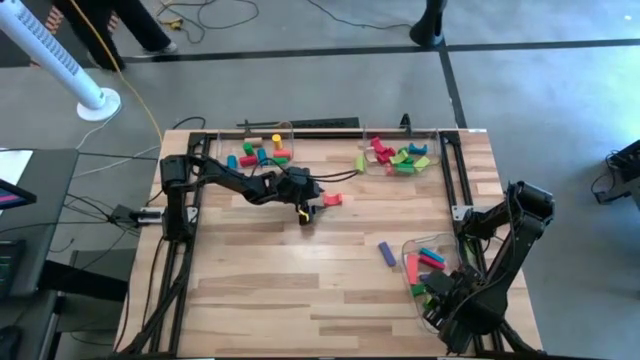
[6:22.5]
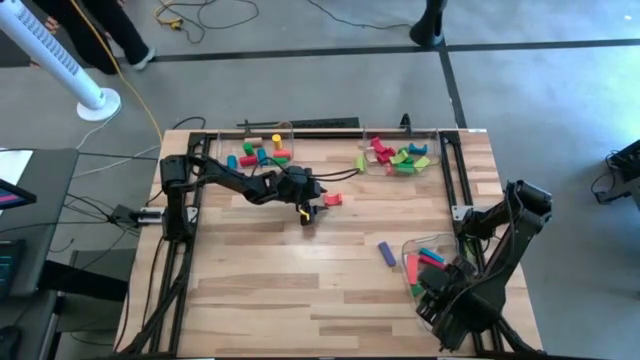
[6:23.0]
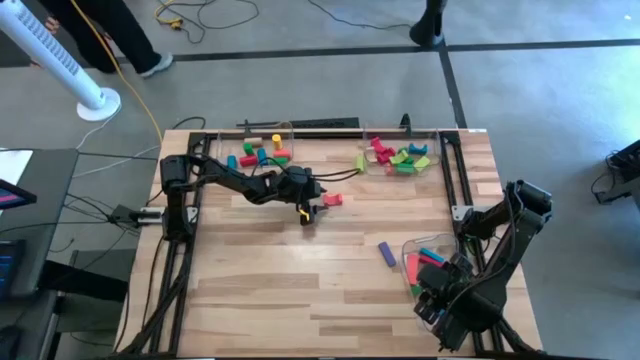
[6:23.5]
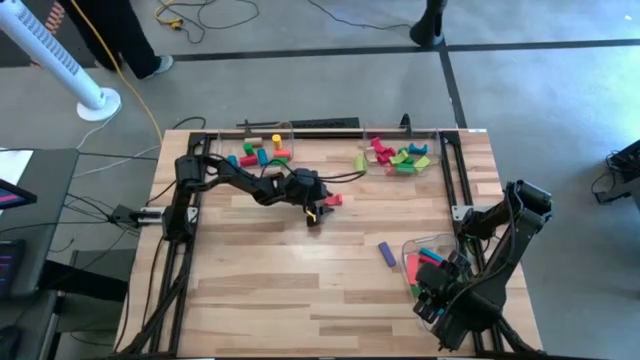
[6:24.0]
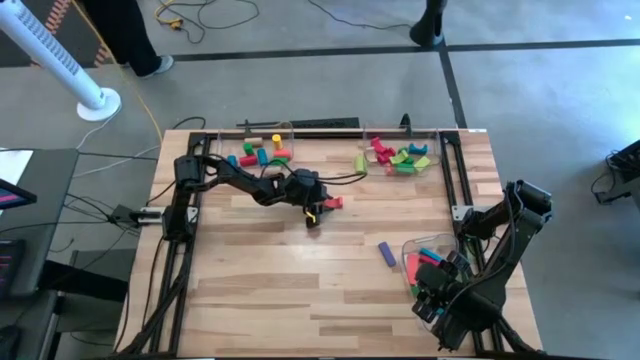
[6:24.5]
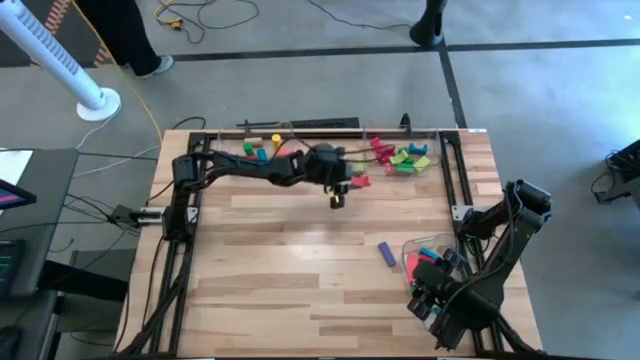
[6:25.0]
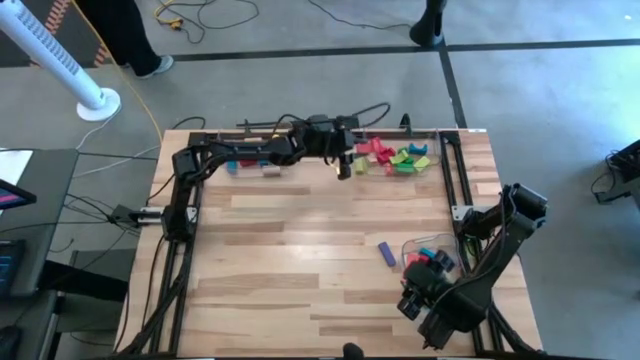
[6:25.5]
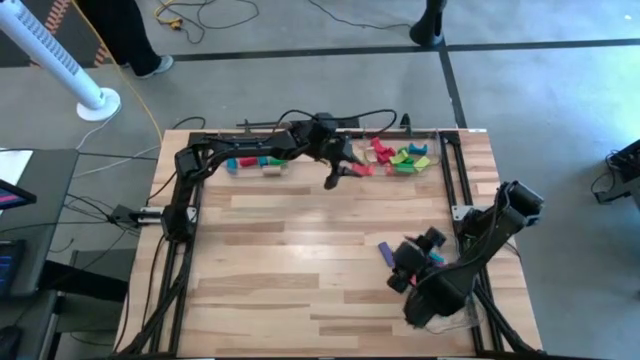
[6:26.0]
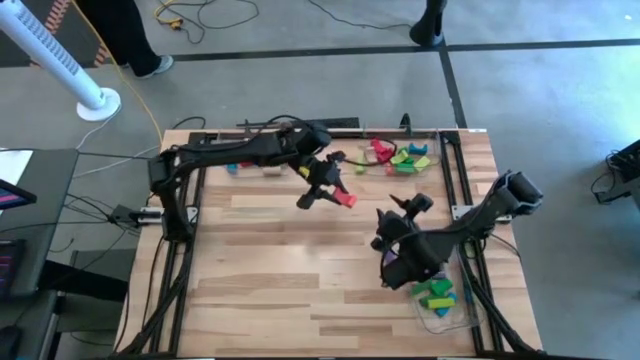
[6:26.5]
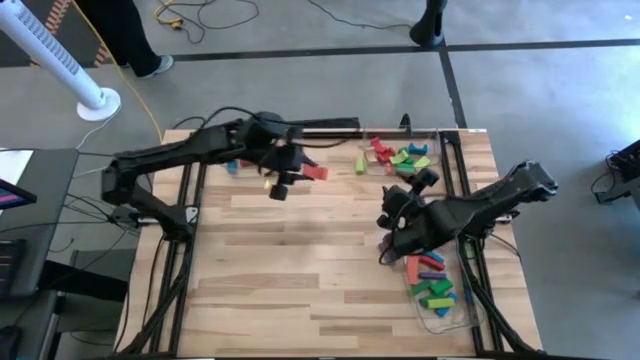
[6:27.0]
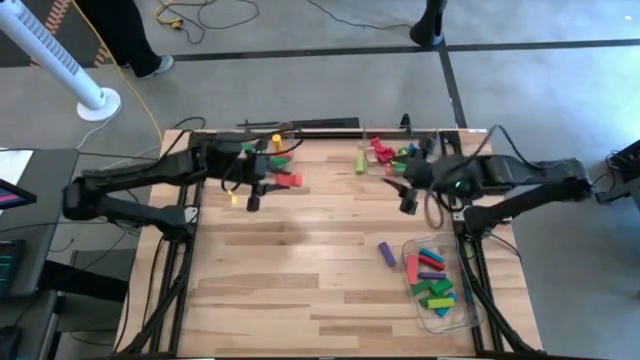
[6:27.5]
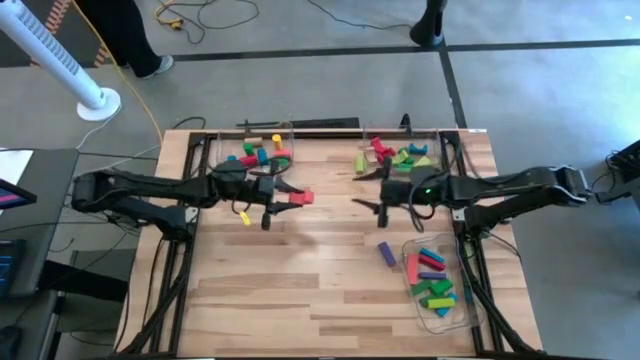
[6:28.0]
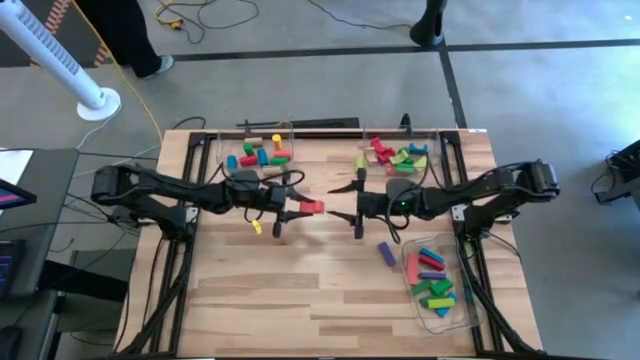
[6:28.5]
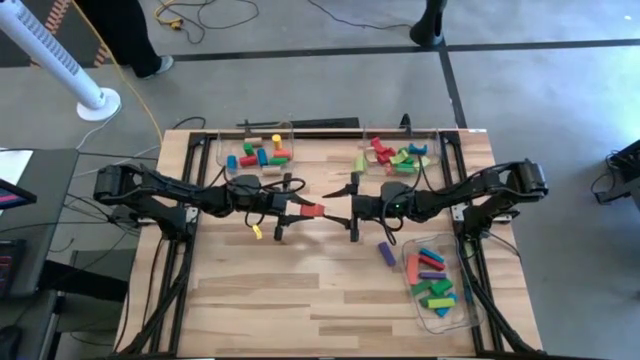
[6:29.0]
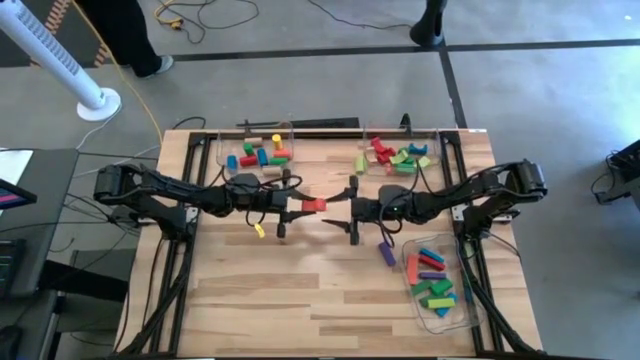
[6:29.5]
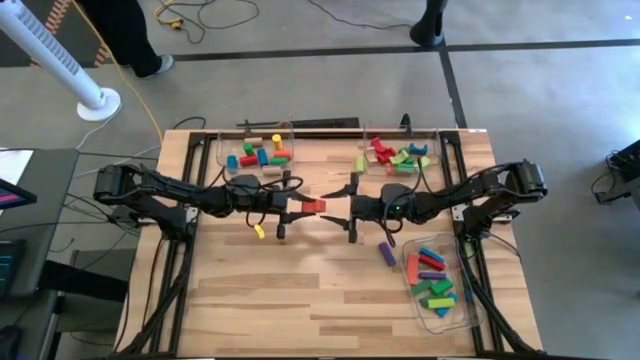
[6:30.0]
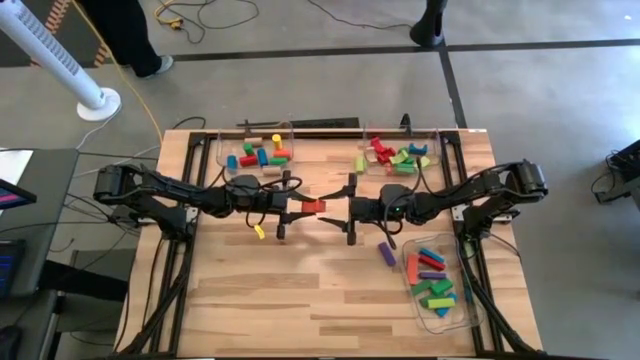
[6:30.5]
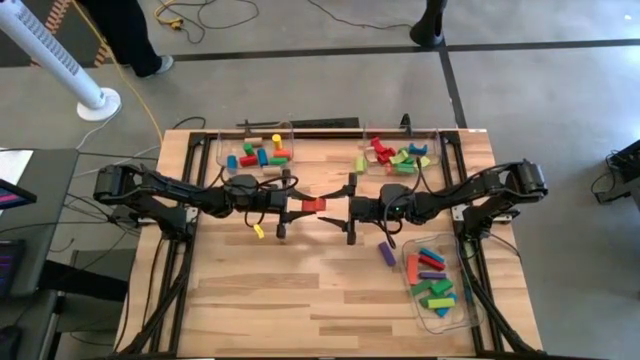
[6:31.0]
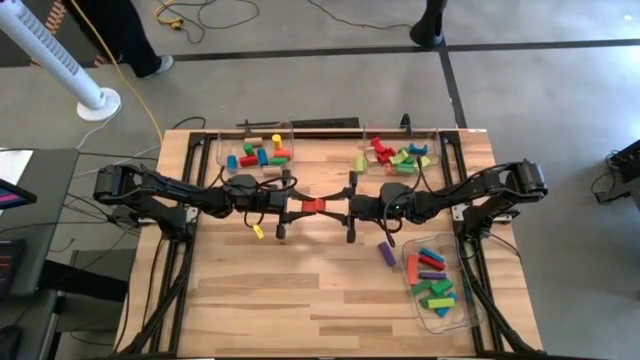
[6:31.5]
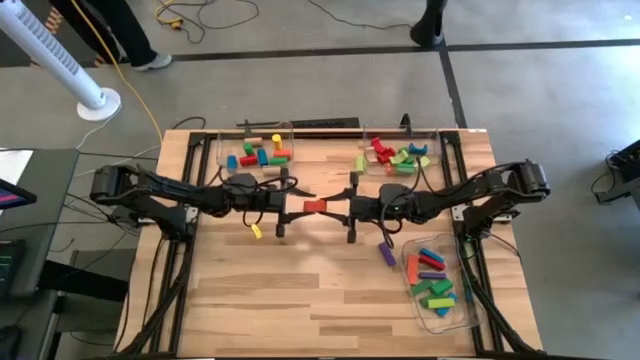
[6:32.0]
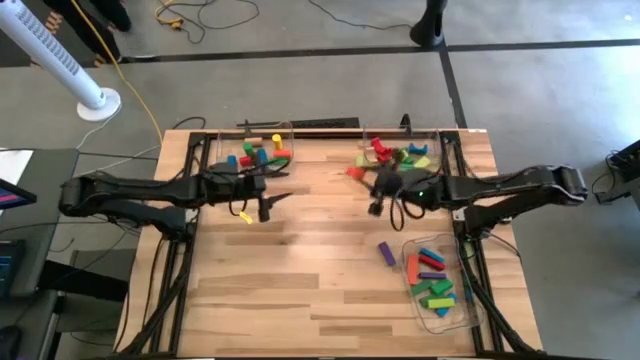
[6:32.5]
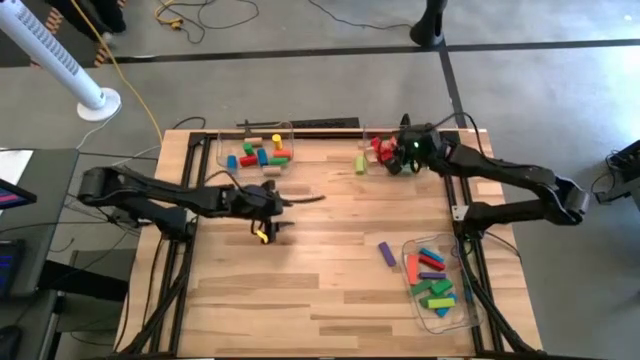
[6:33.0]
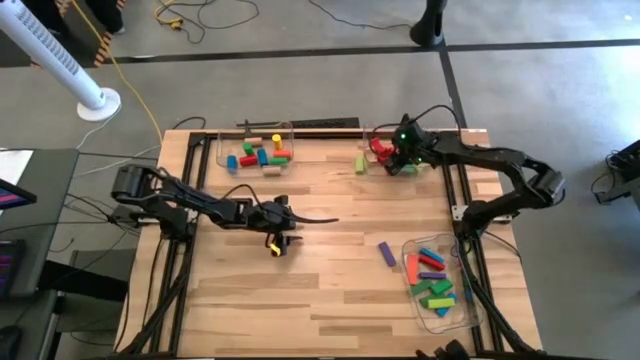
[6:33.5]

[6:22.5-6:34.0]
Task: Sort blocks by size
Put the orange arch block into the top right transparent bin

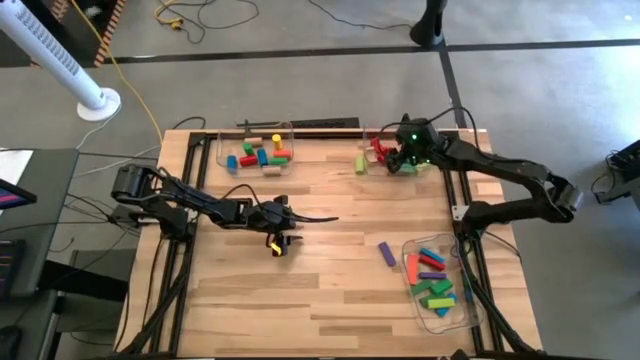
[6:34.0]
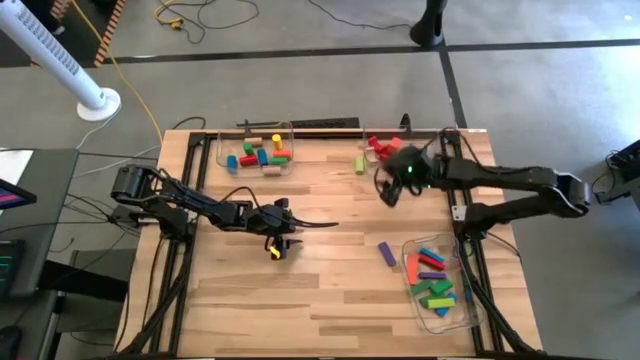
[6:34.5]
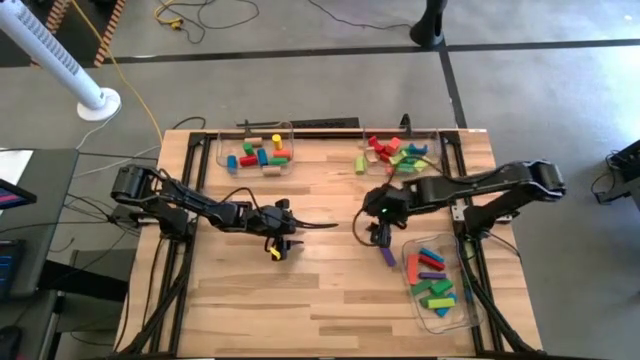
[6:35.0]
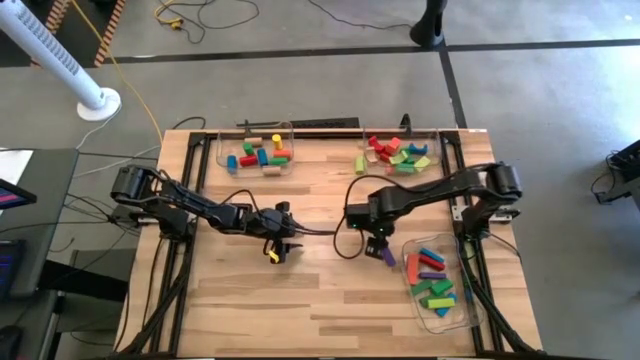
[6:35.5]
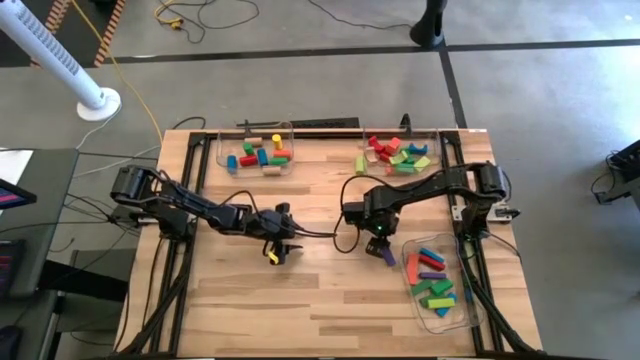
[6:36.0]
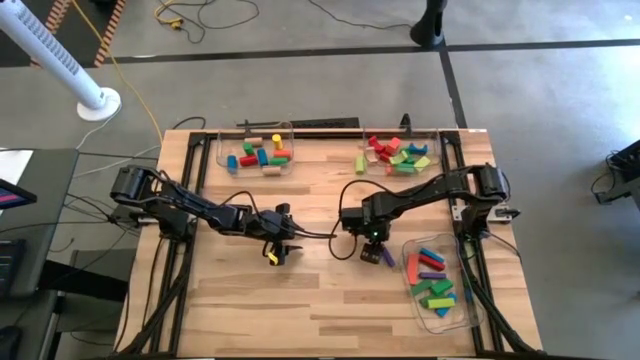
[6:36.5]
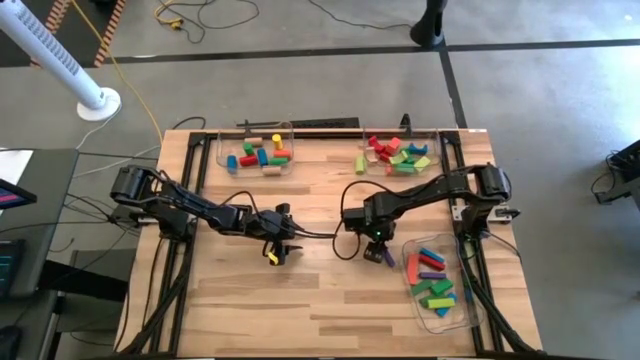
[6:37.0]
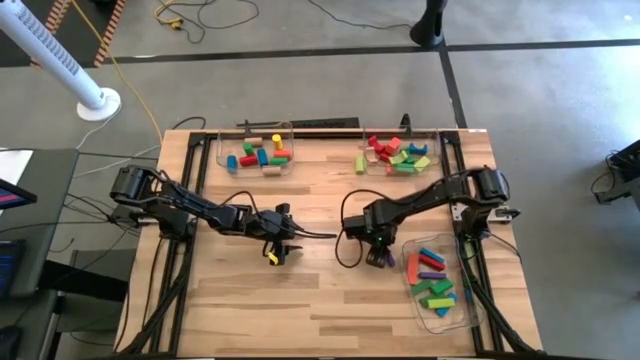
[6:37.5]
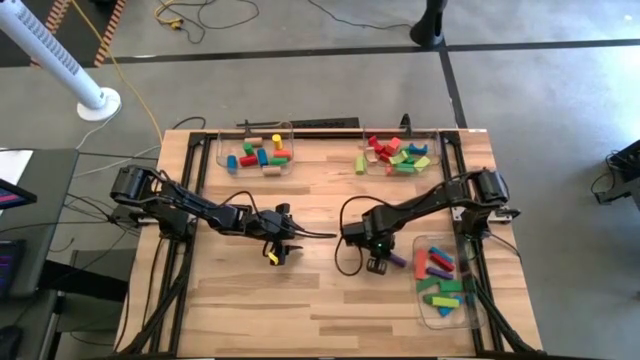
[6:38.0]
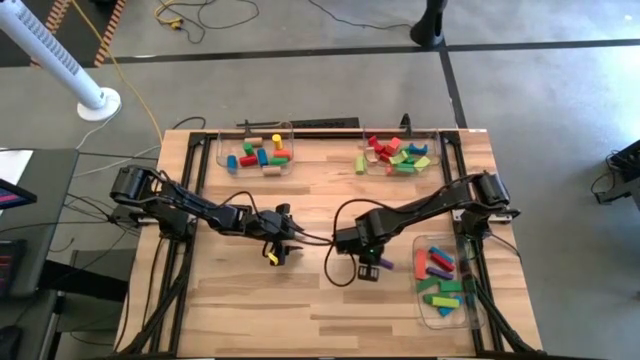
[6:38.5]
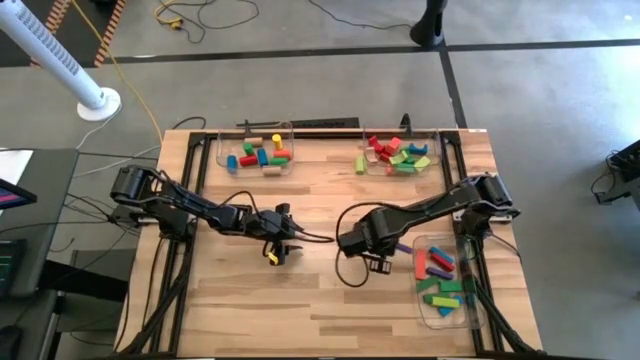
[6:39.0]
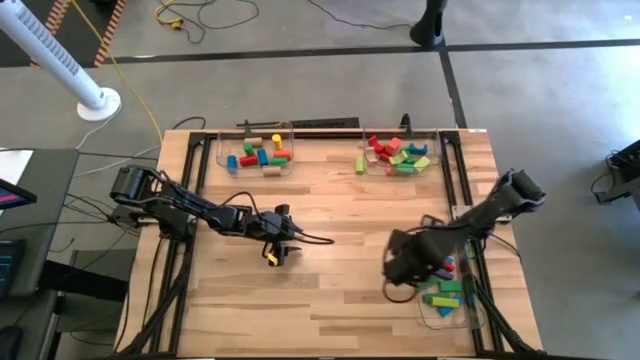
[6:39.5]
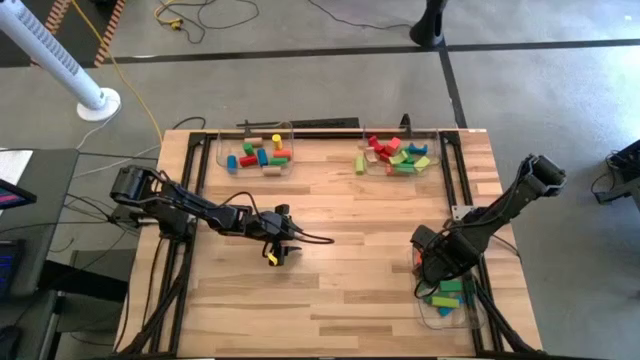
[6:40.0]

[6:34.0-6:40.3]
Put the blue rectangular block into the bottom transparent bin

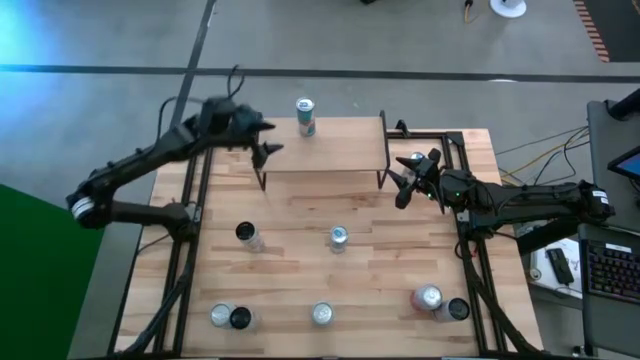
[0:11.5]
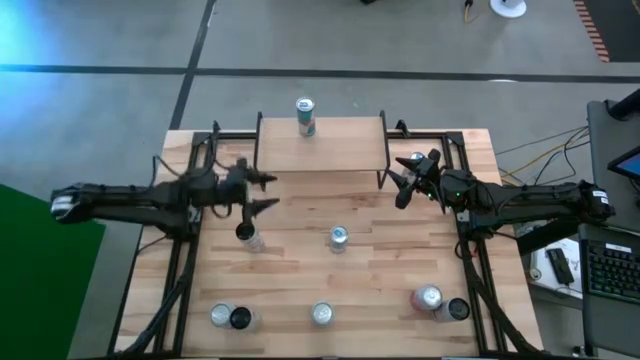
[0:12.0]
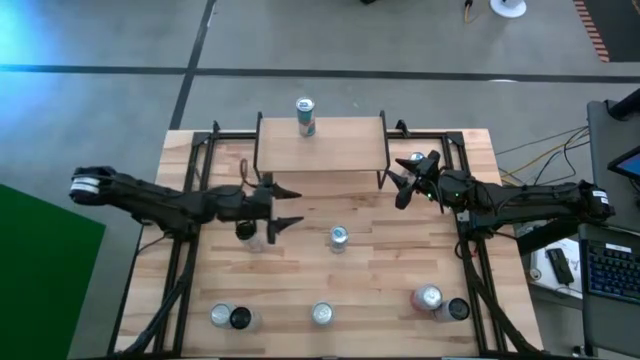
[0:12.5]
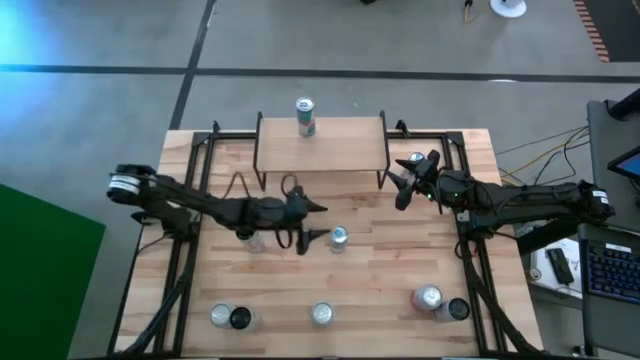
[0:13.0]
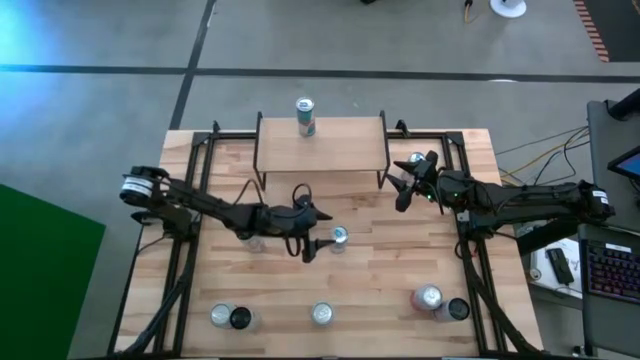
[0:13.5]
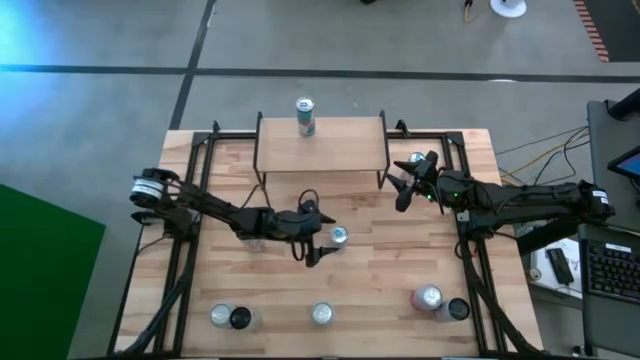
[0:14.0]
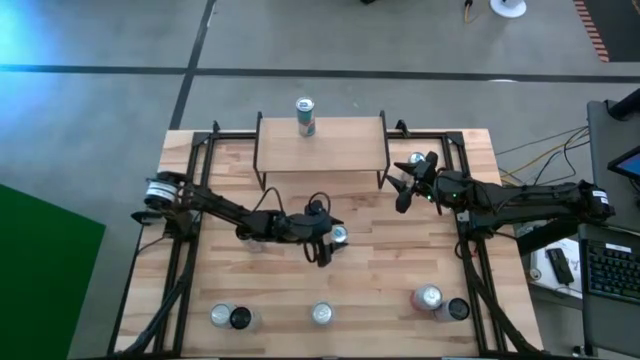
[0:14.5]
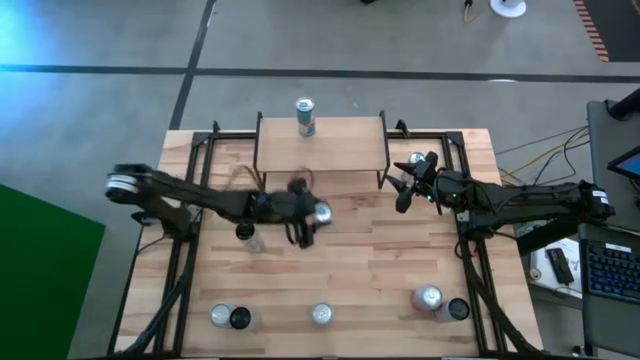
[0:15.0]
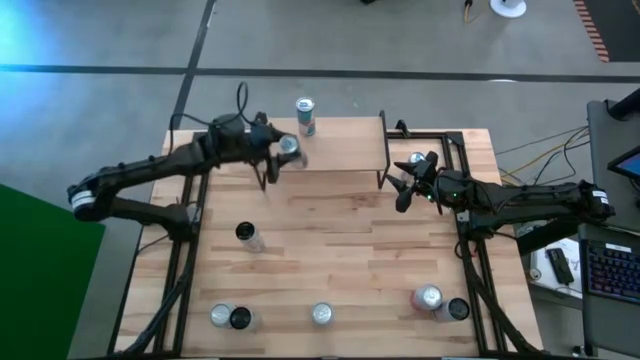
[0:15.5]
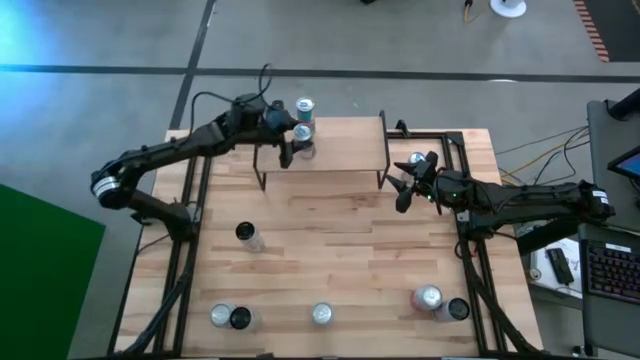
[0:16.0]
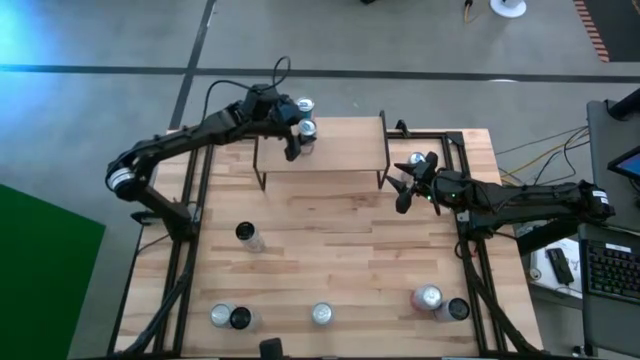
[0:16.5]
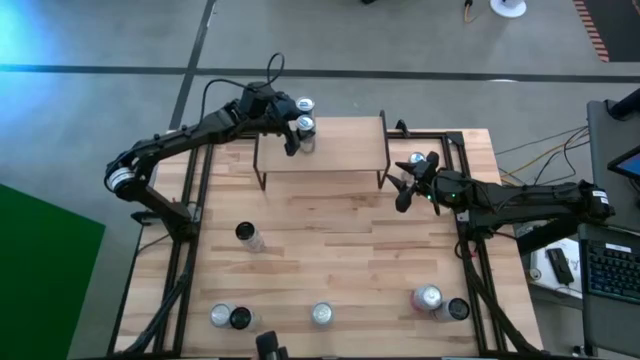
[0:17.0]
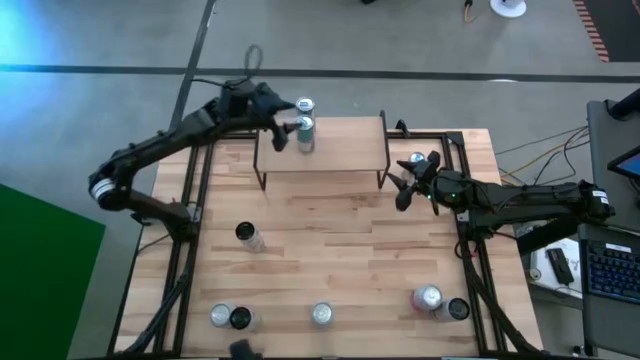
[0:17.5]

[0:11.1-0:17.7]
Task: Place canned beverage on shelf
Align the left blue soda can with the other blue soda can on the shelf
